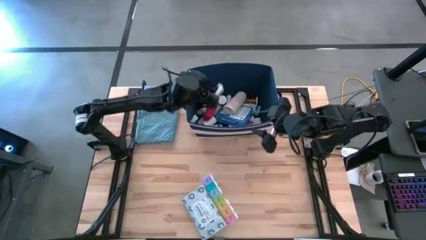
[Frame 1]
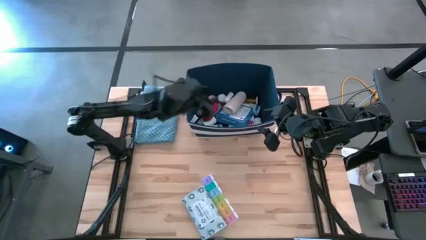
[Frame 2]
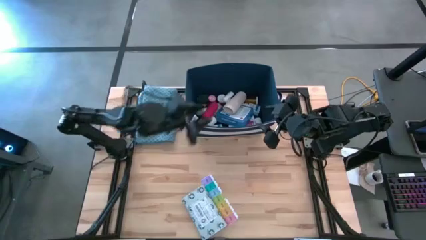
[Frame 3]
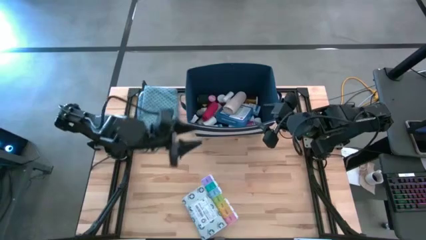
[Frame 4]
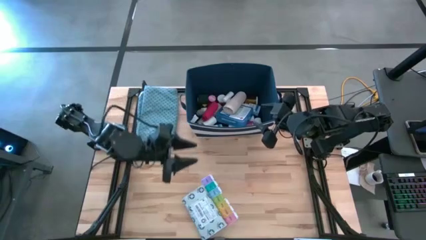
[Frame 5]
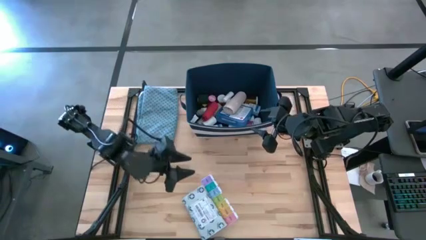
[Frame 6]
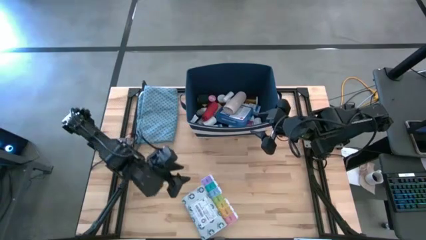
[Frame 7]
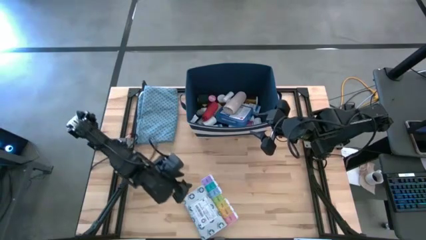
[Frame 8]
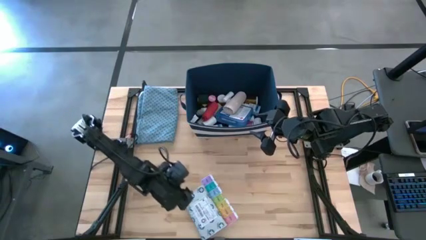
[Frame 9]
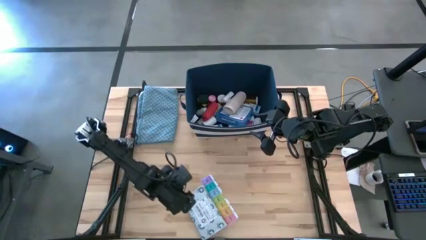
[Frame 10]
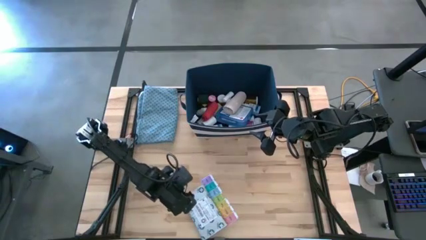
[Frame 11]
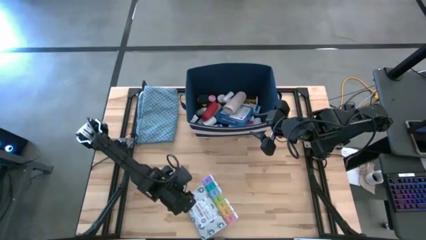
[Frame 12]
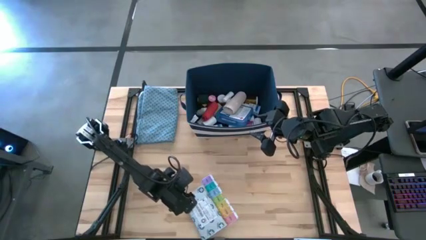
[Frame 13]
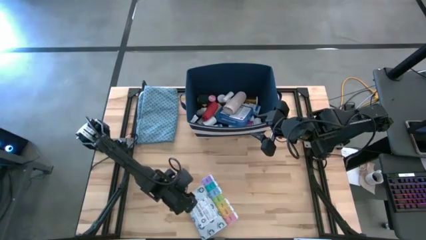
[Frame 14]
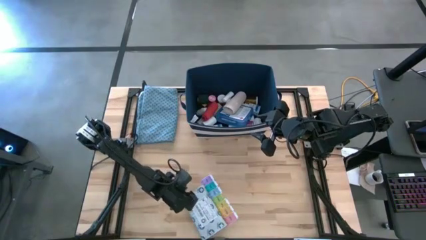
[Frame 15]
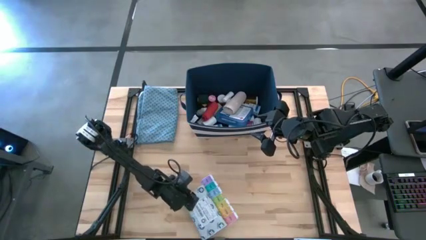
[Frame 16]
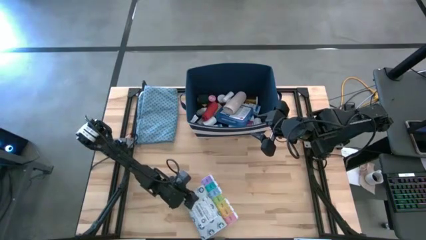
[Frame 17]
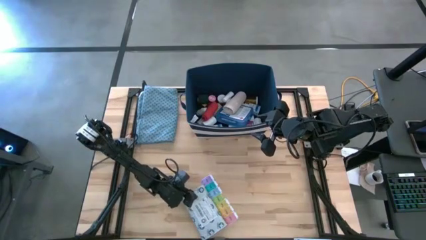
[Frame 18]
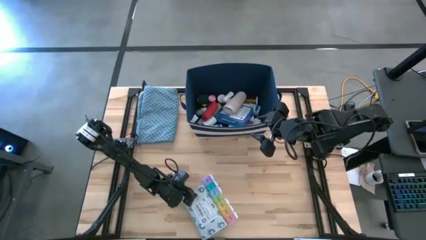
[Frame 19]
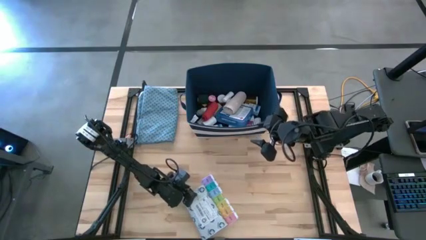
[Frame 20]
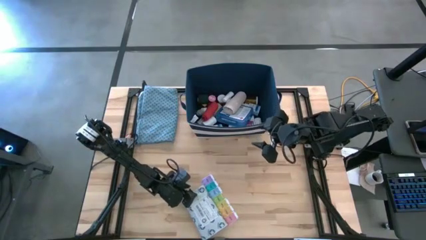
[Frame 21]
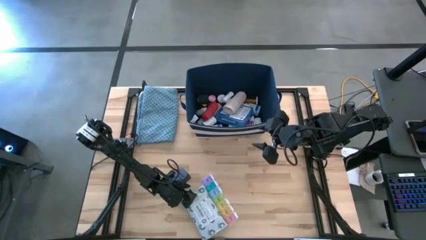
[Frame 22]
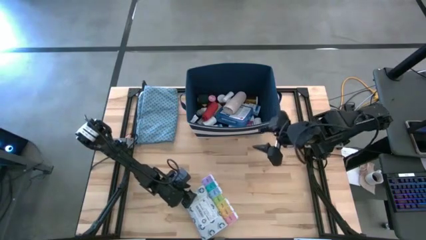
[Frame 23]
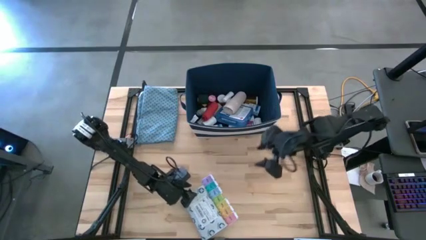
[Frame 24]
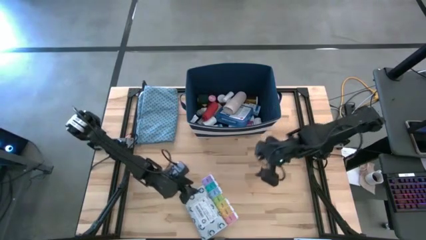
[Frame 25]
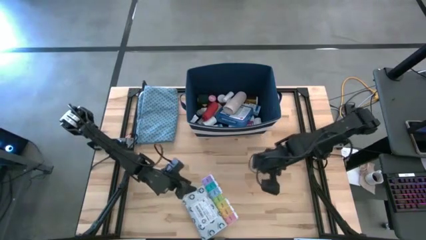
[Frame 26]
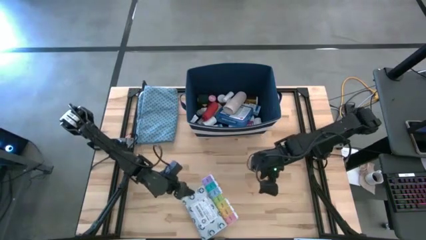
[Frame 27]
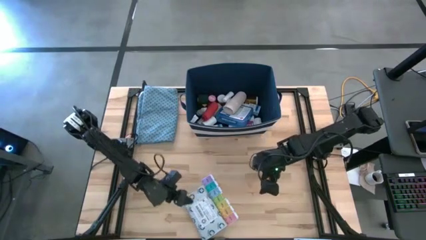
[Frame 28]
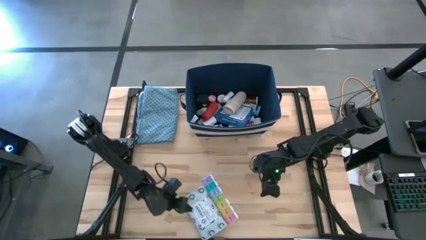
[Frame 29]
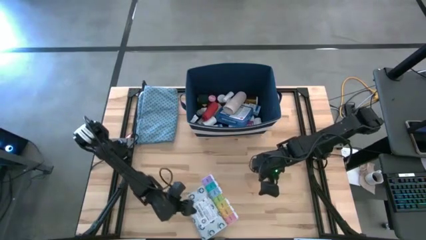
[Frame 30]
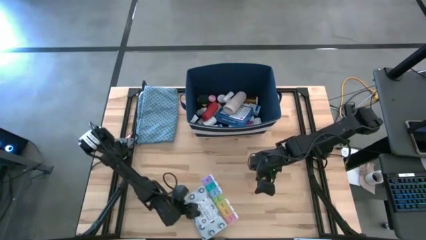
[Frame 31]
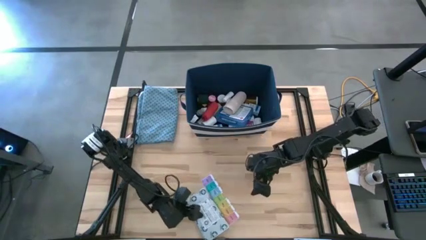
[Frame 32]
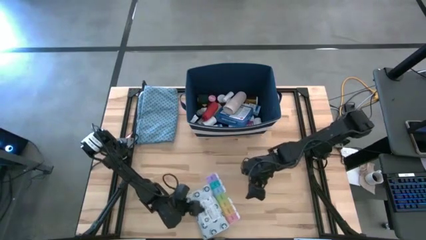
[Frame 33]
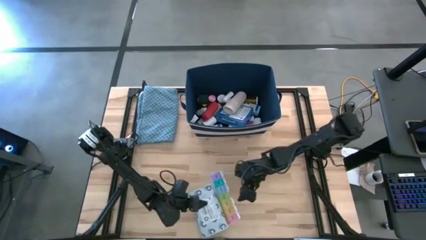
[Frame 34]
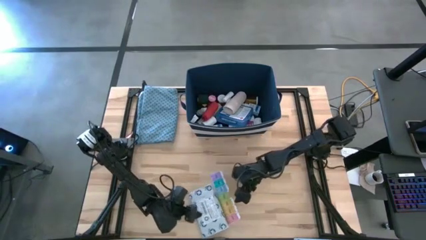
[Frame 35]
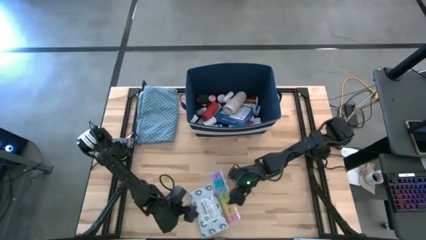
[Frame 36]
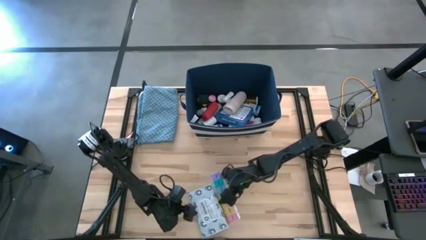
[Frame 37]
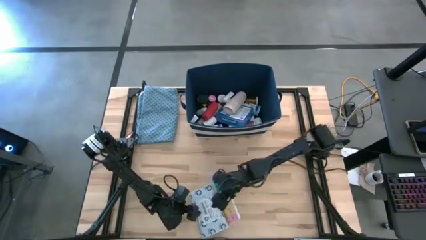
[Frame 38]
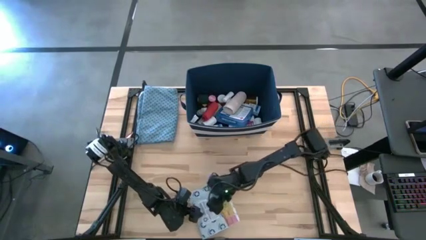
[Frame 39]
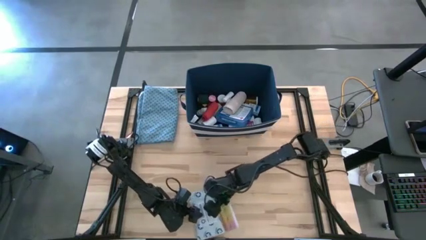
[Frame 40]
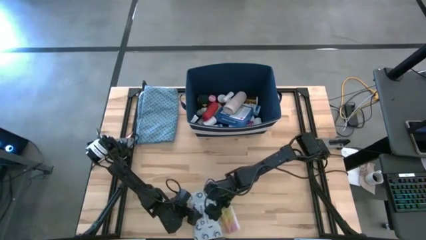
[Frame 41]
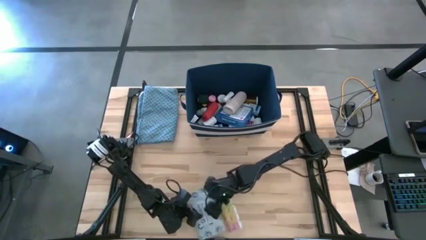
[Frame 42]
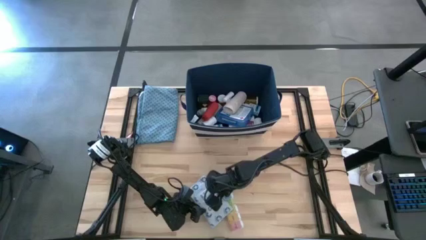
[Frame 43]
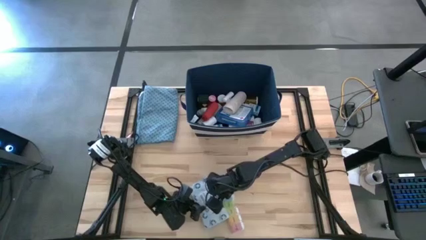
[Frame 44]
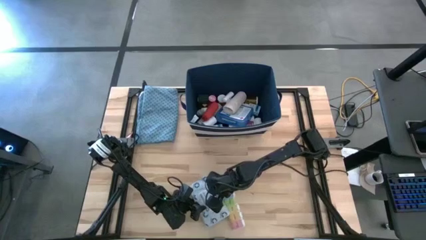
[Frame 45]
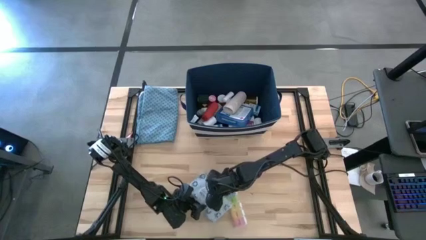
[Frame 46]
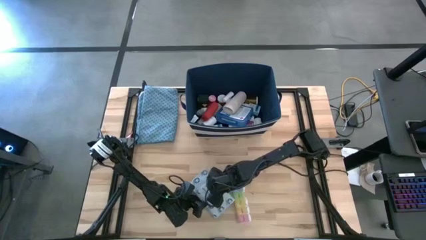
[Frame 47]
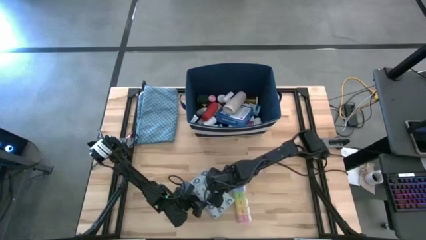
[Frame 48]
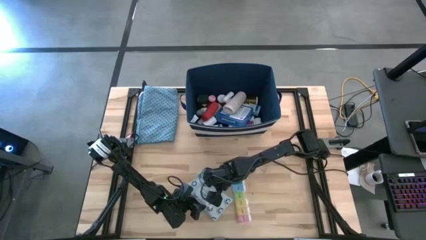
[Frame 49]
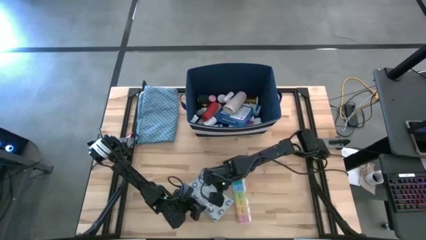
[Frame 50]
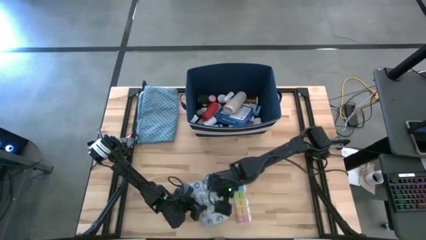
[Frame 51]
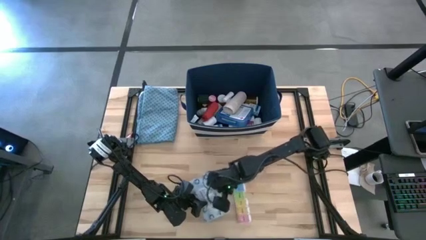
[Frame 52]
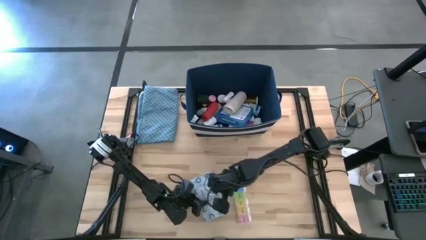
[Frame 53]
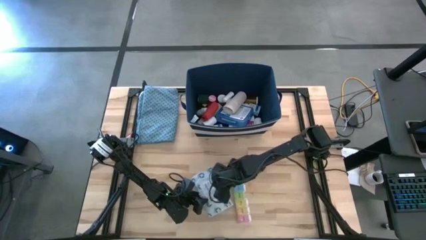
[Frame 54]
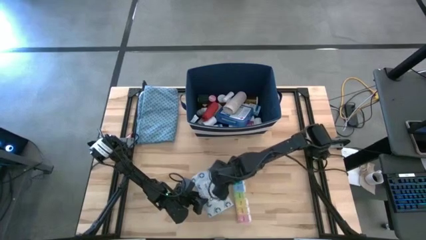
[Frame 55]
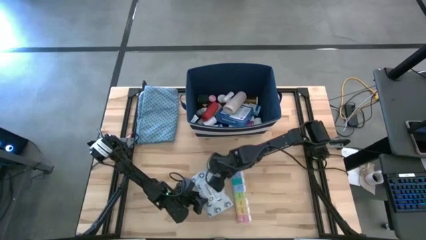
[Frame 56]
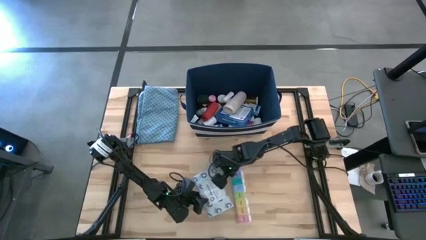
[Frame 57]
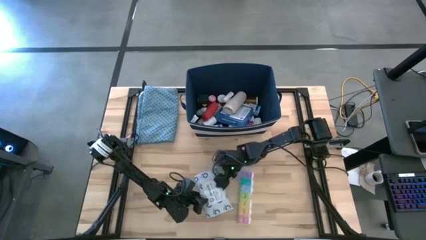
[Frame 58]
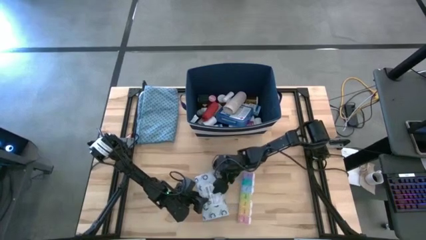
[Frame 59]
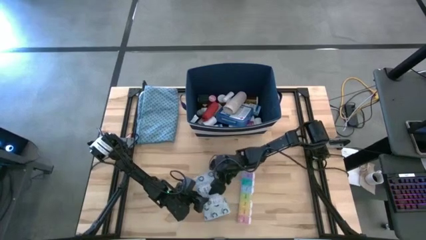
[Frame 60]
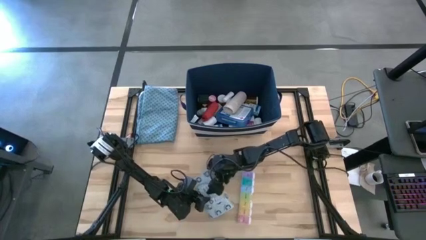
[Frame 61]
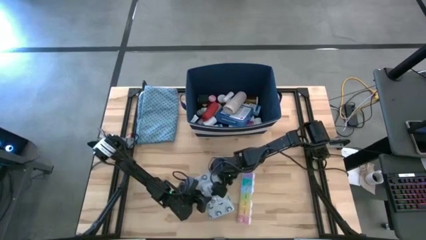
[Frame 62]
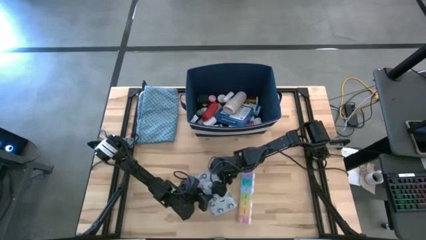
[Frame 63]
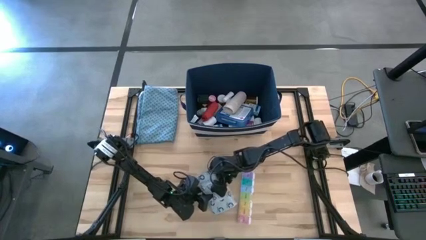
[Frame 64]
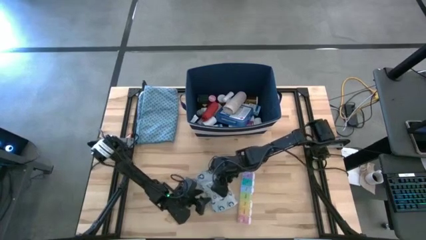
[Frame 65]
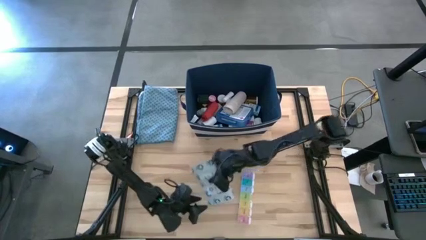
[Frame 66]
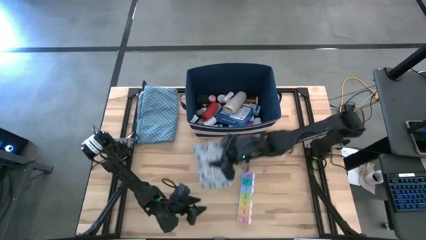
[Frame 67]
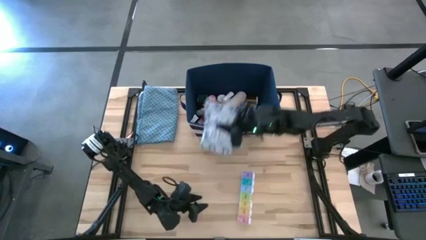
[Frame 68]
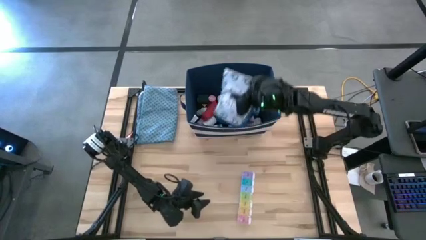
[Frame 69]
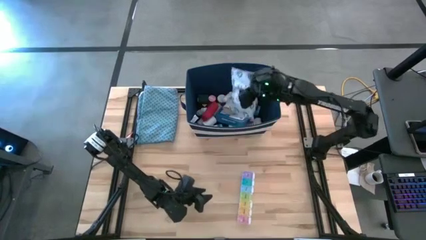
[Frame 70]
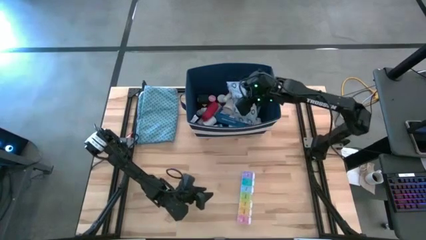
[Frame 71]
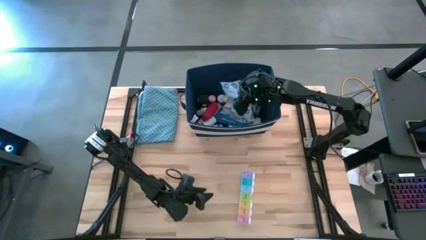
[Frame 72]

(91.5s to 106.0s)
Task: Pick & place medical supplies in basket/bin
Put the mailer bag into the blue bin
